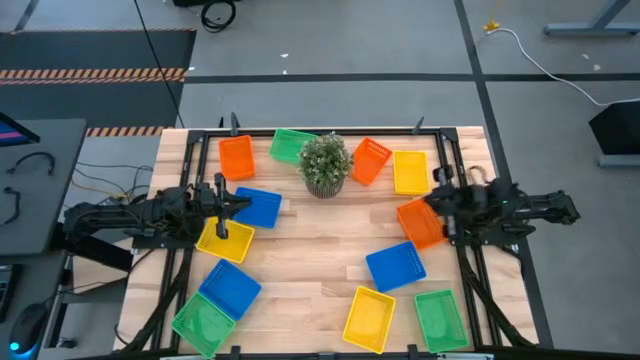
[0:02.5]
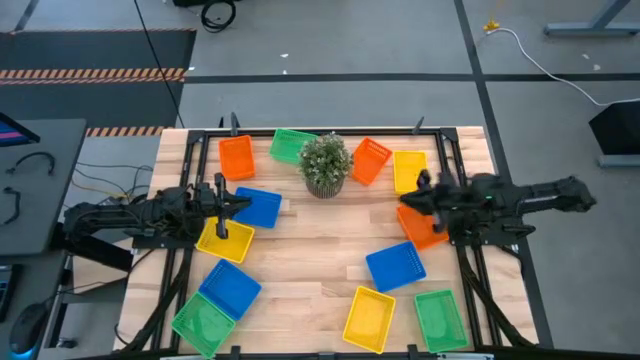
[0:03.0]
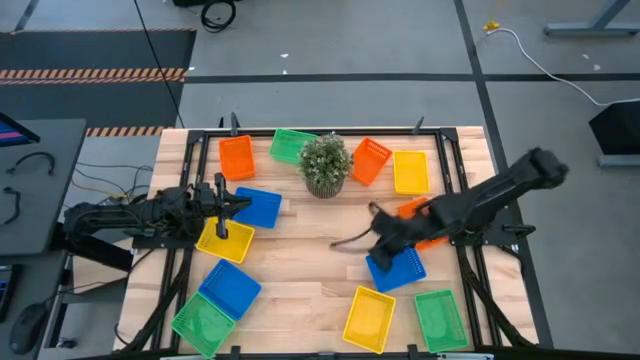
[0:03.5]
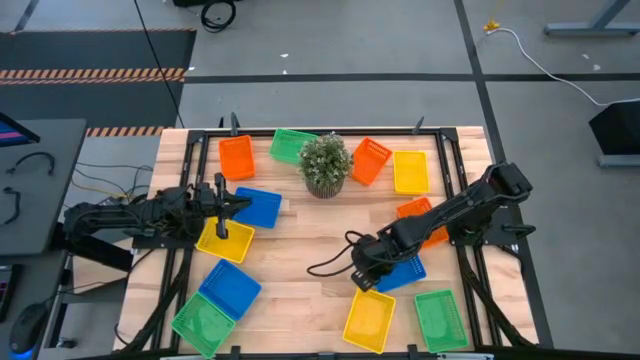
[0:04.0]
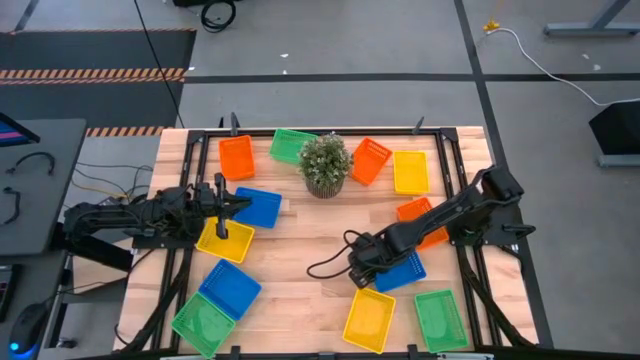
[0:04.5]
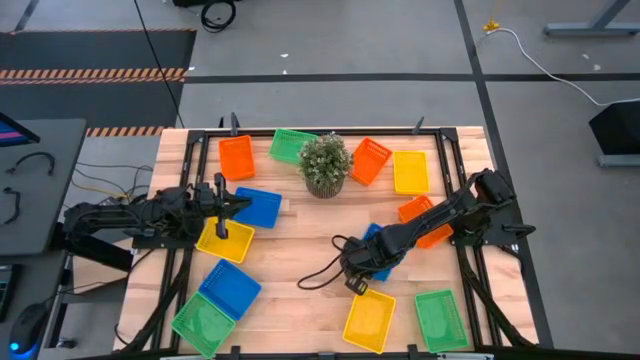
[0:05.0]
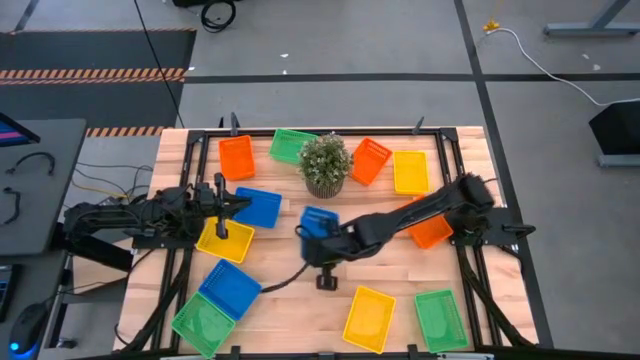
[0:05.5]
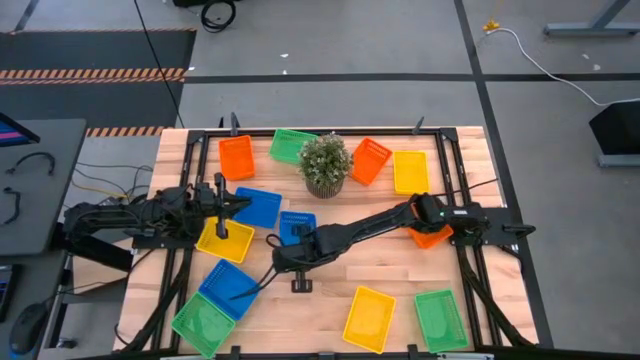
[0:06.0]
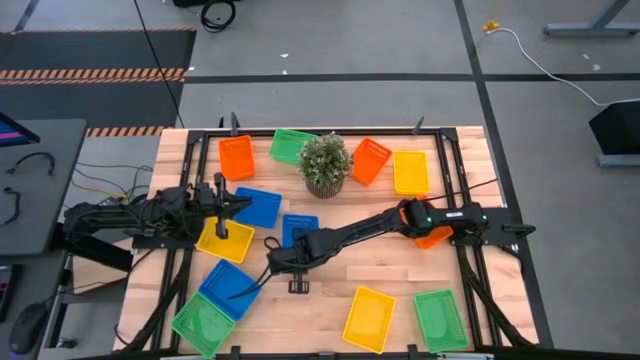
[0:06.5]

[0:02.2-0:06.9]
Move the bottom right blue bin to the middle left of the table

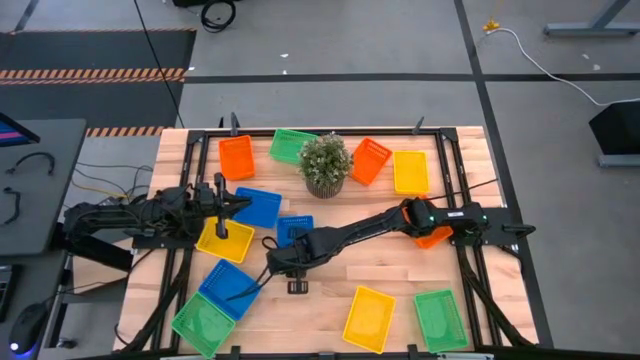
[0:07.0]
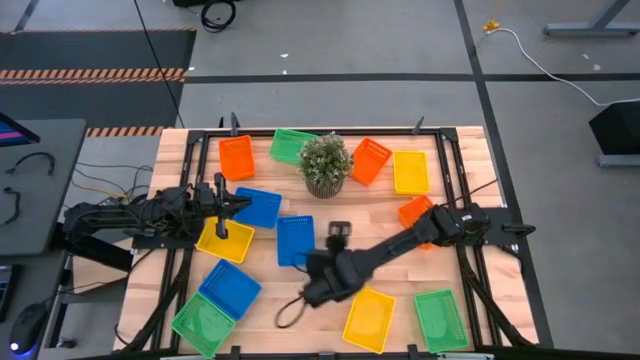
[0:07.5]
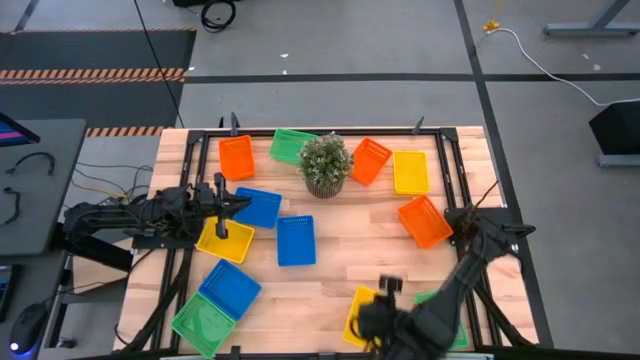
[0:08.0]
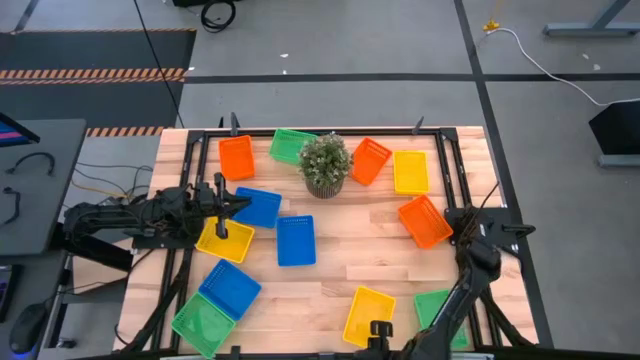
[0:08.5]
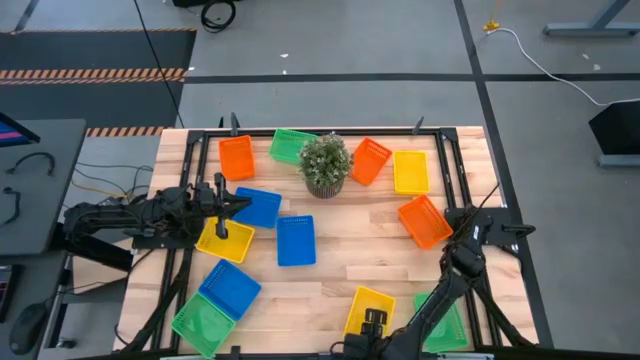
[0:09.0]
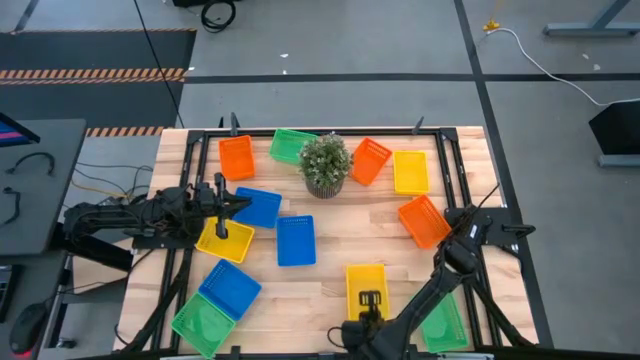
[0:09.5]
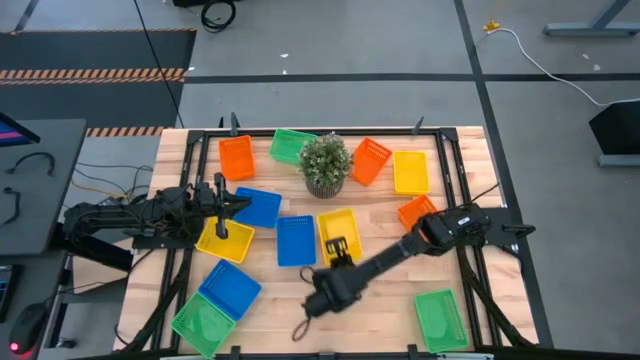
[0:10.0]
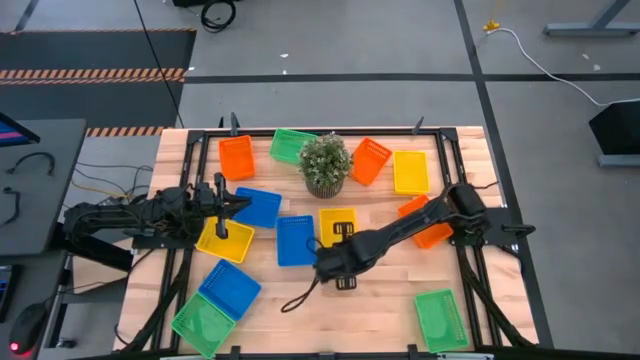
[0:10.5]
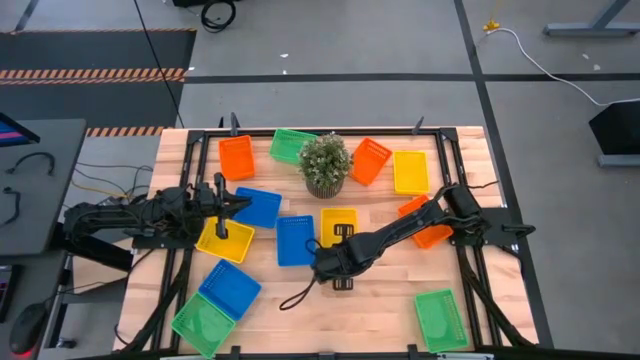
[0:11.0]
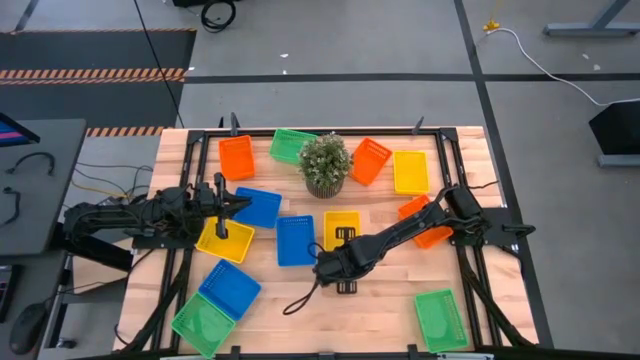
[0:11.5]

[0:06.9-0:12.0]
Move the bottom yellow bin to the center of the table

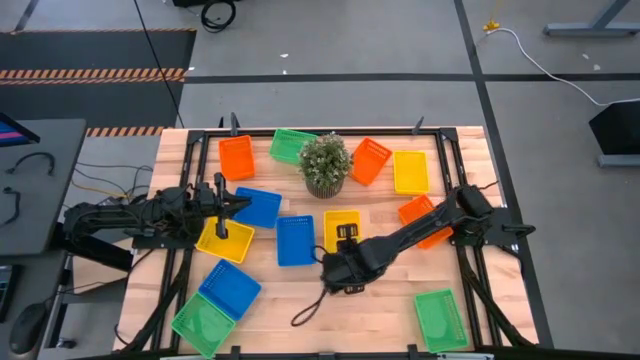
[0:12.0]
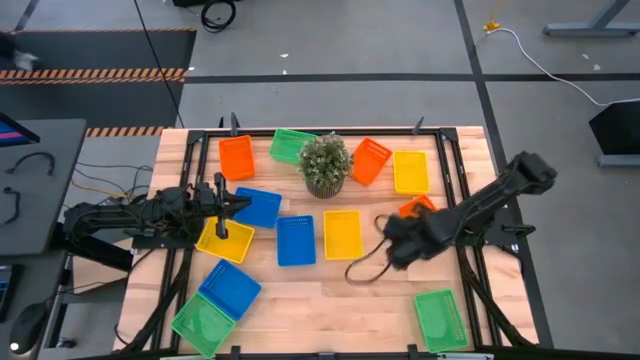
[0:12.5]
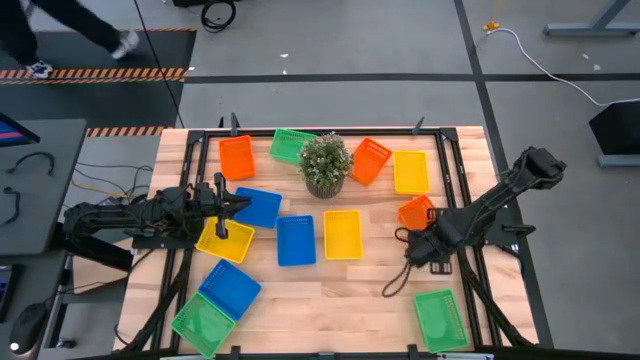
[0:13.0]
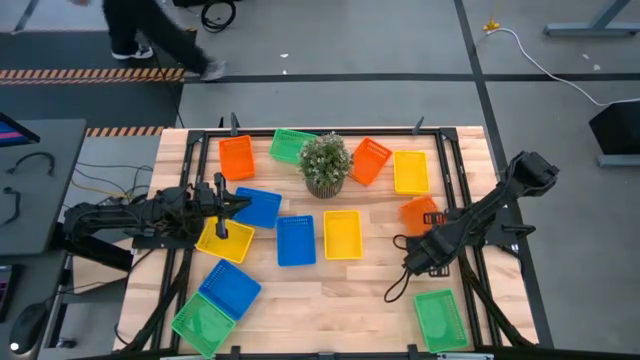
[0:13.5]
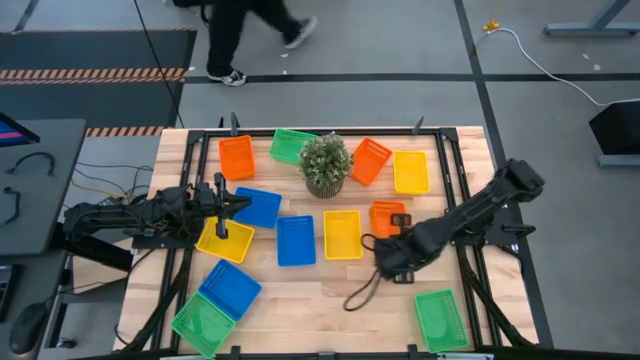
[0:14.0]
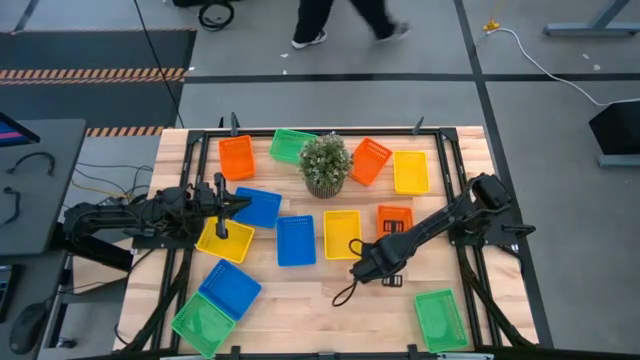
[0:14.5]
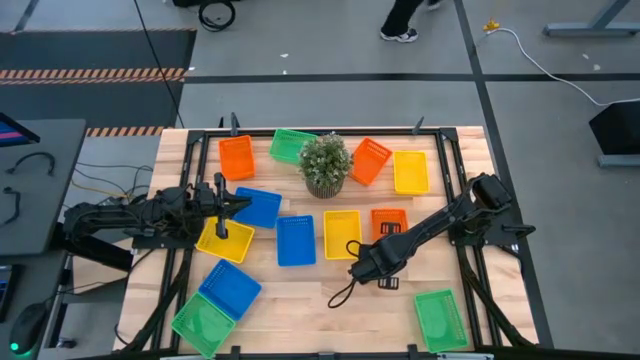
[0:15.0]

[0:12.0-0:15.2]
Adjust the bottom orange bin

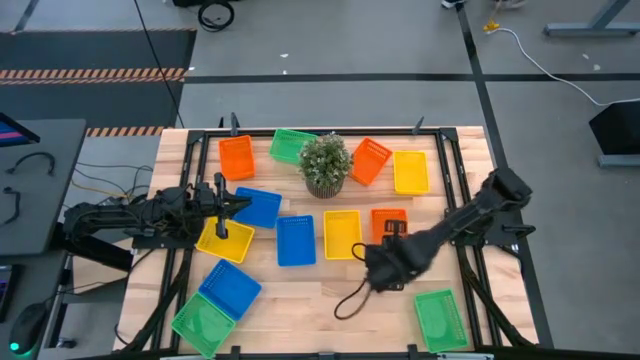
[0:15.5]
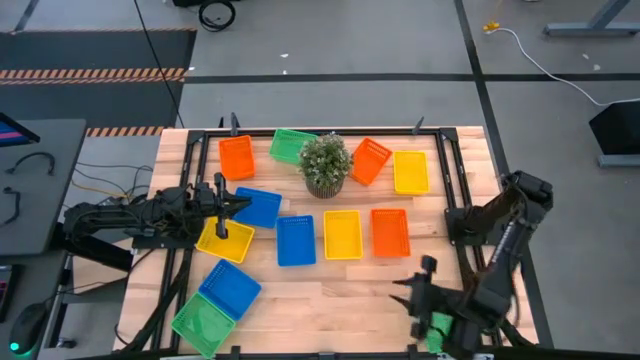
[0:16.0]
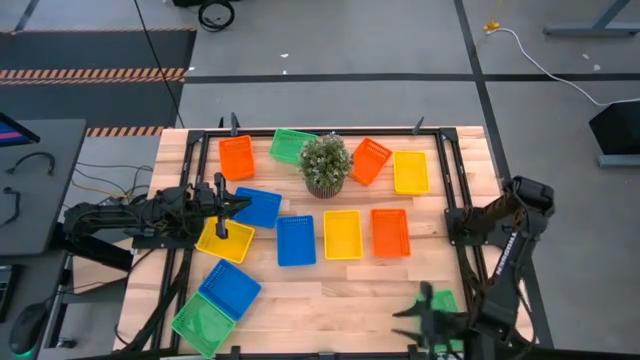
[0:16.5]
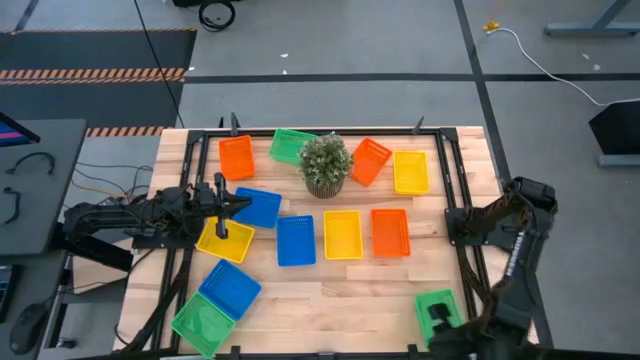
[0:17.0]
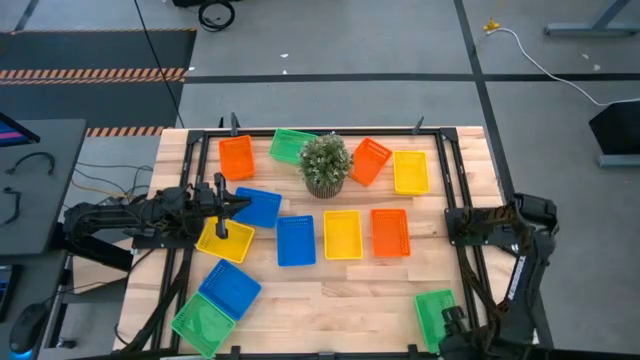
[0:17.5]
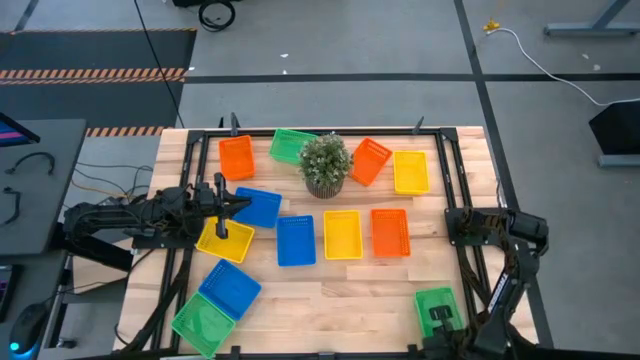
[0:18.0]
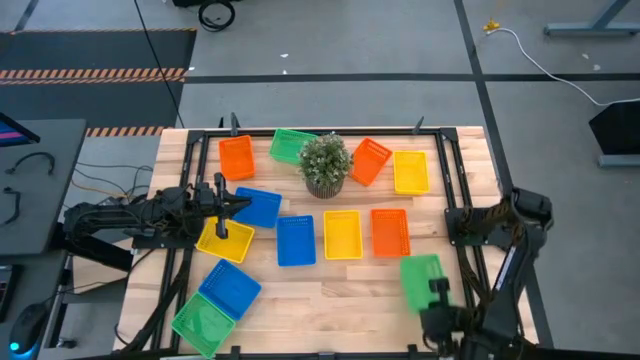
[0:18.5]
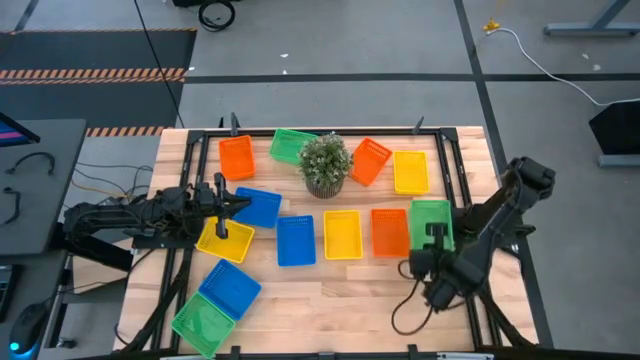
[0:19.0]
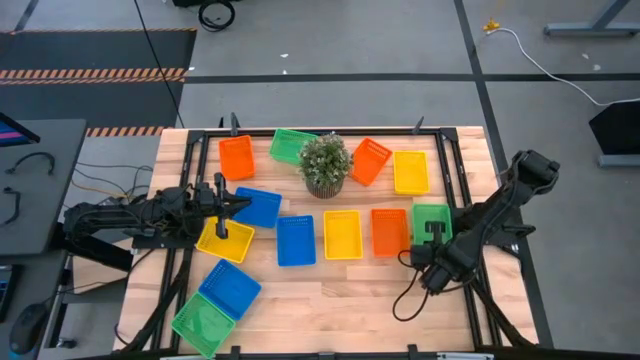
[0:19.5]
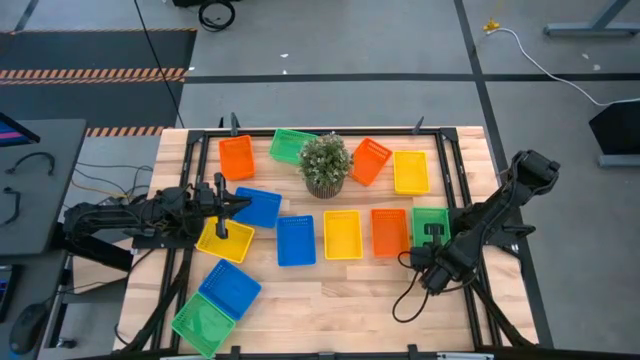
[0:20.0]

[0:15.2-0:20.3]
Move the bottom right green bin to the middle right of the table
